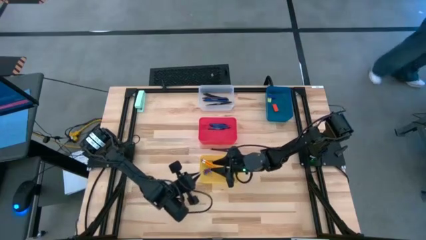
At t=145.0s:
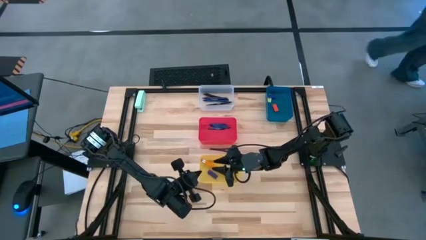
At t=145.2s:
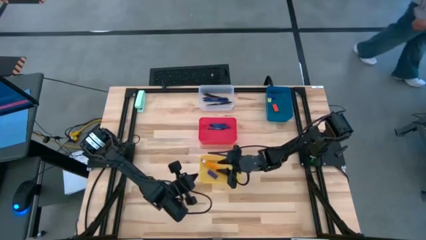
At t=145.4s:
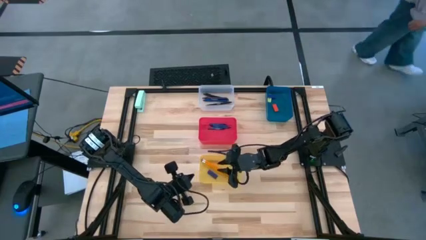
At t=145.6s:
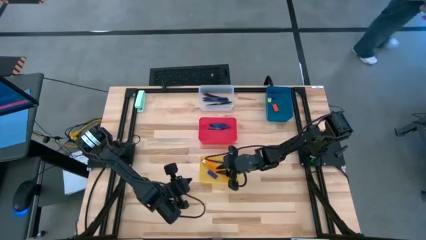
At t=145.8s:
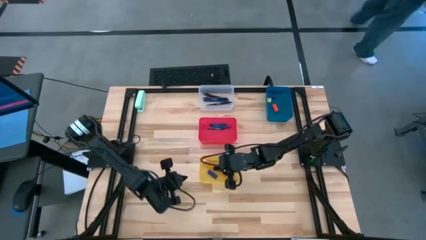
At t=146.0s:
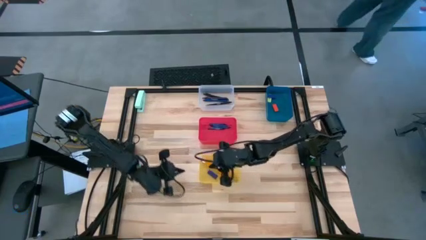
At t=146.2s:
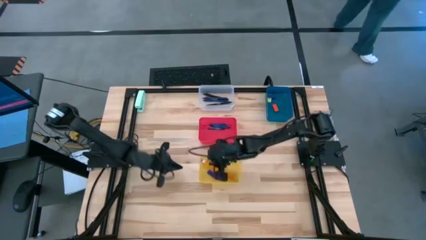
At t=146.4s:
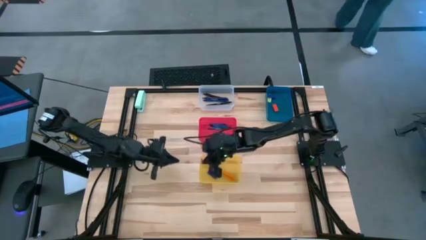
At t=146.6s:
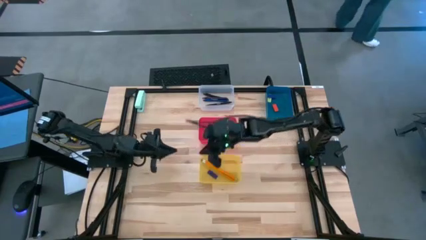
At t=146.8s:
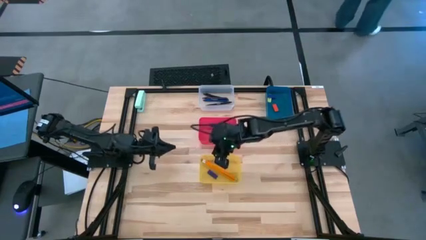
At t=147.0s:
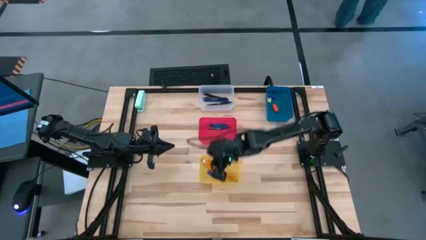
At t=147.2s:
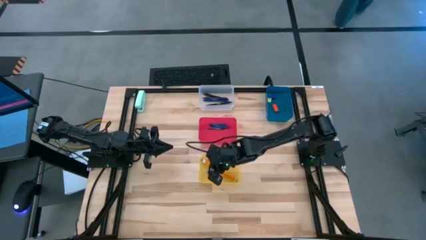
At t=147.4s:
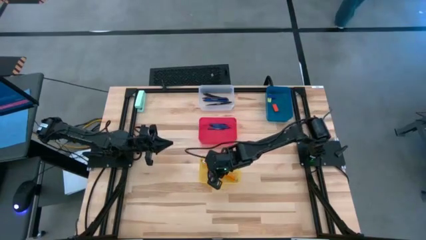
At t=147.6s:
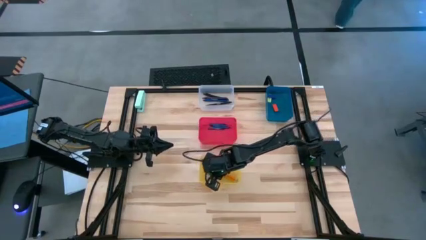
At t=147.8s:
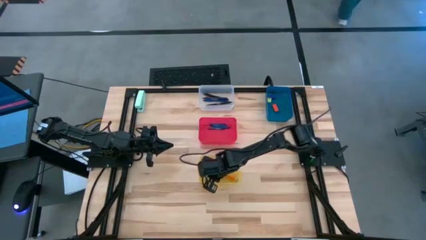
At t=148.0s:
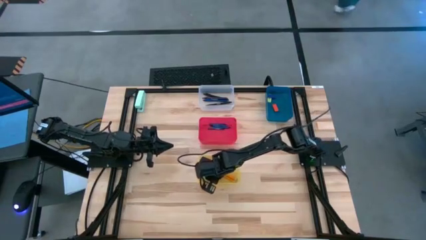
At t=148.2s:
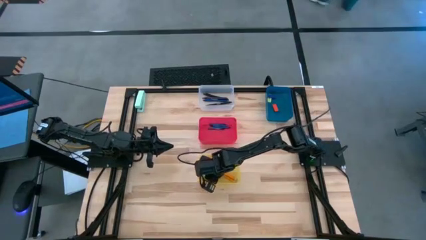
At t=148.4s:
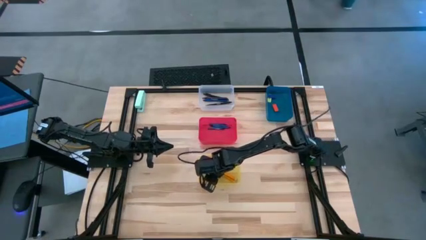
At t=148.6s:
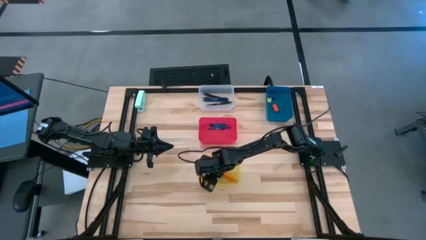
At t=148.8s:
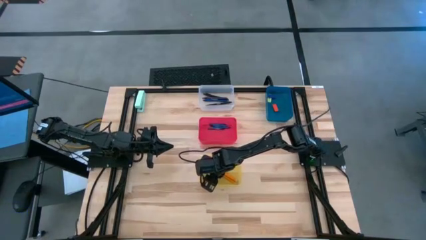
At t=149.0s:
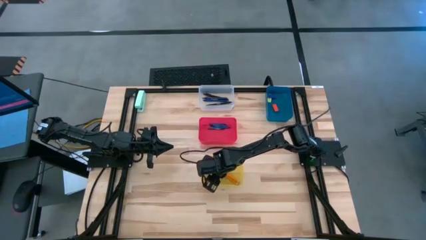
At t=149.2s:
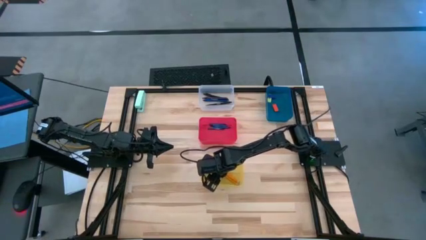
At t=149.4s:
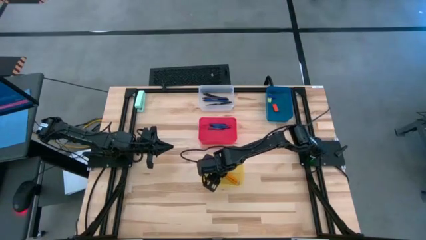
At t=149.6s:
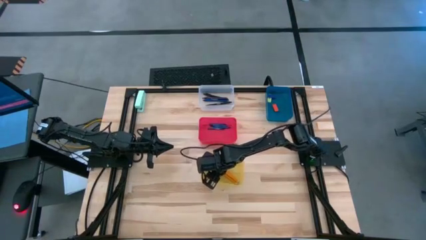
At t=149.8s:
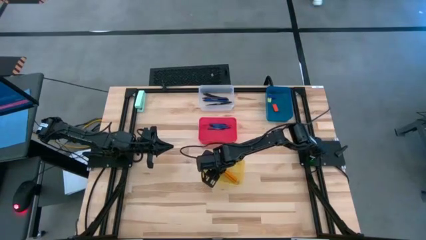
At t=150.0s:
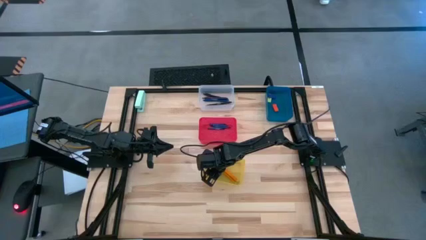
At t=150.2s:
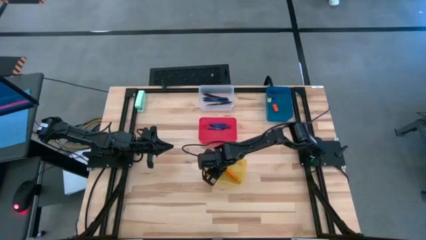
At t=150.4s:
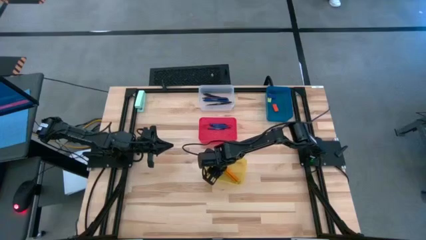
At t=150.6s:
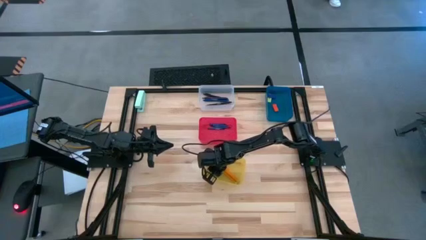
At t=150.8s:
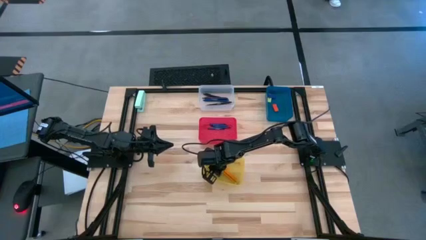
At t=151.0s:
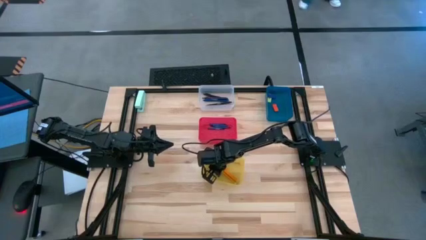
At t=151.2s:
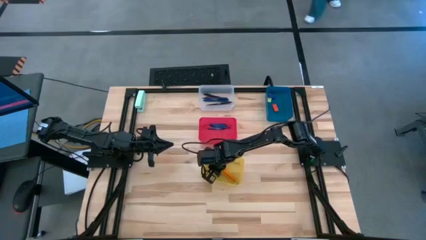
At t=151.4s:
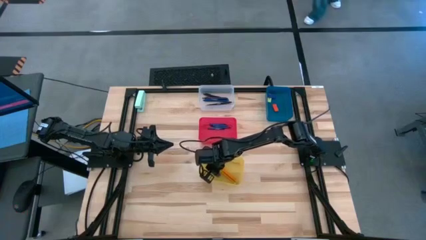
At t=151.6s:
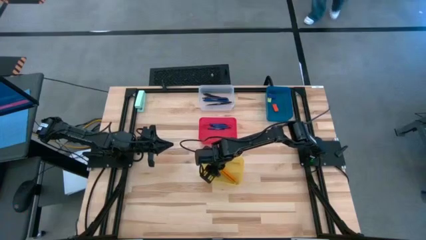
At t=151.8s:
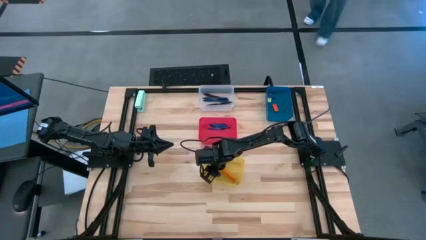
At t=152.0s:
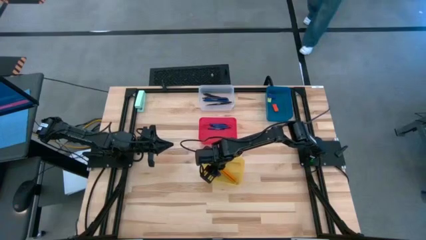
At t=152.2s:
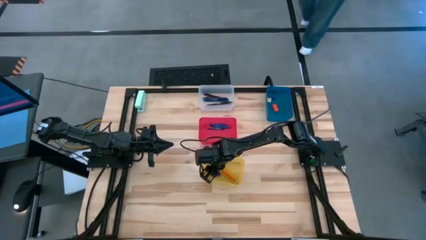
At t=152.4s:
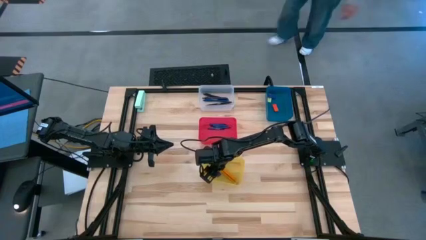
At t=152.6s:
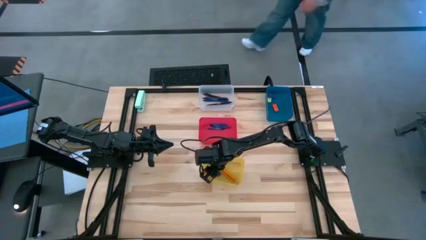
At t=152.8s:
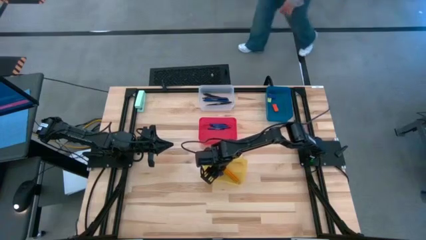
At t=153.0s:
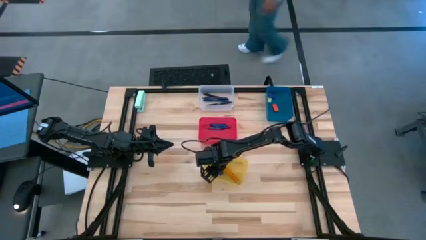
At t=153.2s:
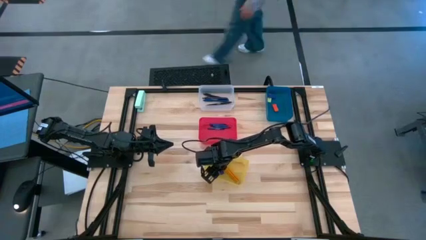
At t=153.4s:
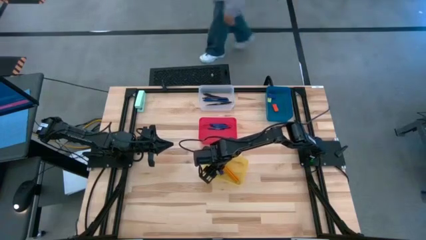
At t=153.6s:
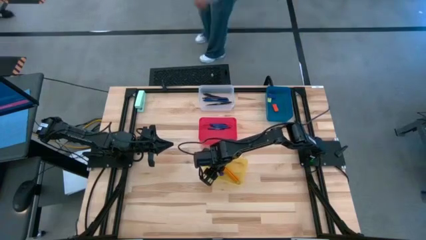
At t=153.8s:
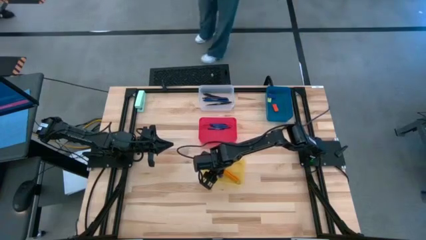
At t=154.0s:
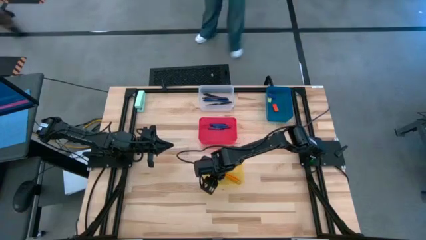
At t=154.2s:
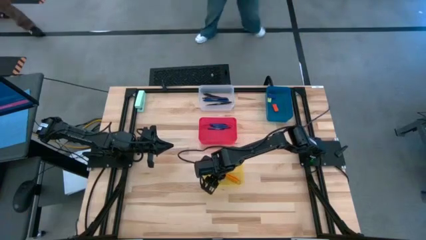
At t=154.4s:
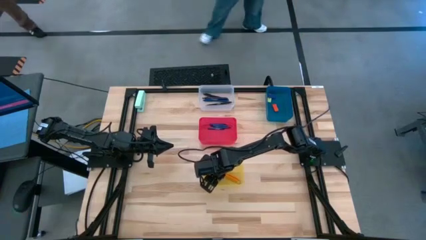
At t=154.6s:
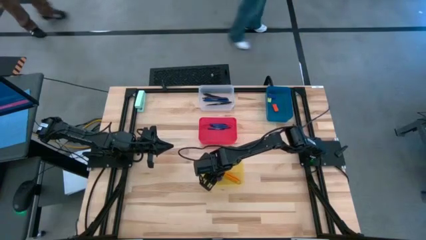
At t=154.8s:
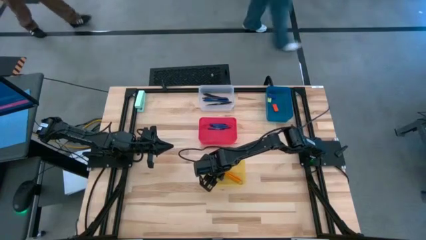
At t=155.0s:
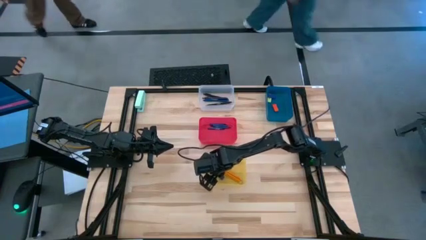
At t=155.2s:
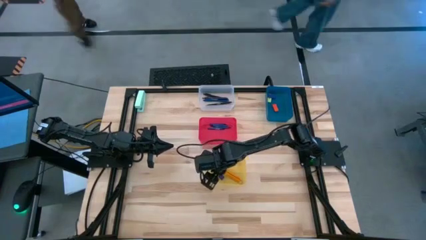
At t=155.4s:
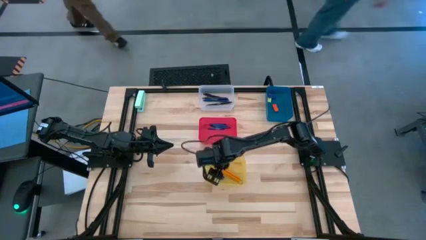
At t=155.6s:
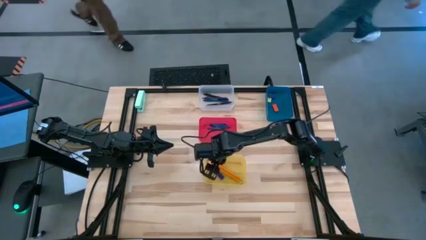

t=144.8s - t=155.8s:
Task: Sort crayons/erasers/pens/pencils in bins
Adjust the orange pencils in the yellow bin

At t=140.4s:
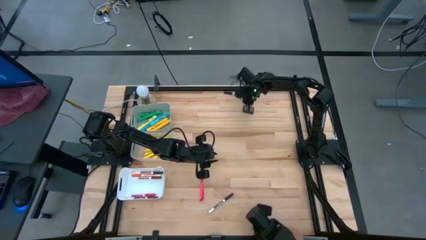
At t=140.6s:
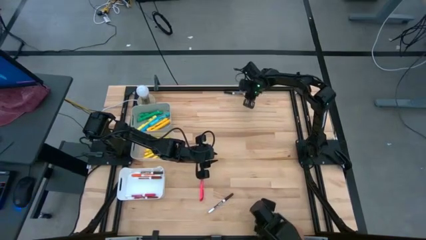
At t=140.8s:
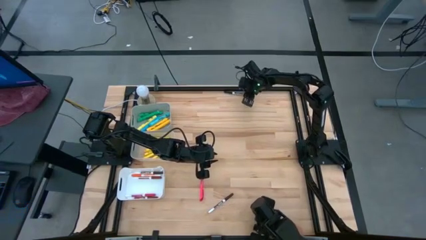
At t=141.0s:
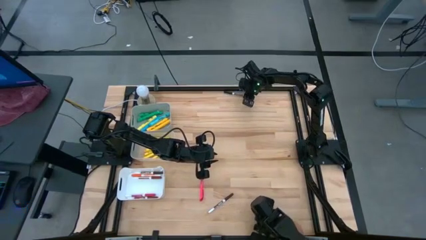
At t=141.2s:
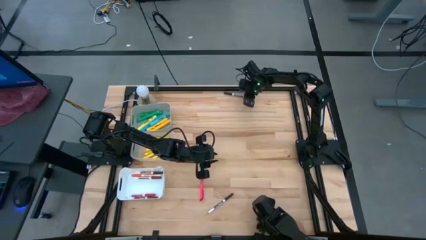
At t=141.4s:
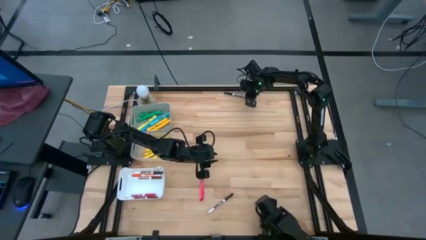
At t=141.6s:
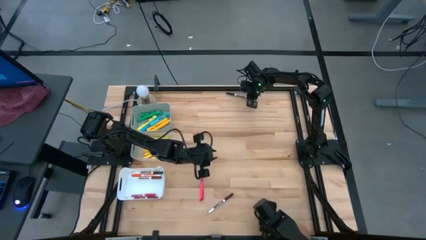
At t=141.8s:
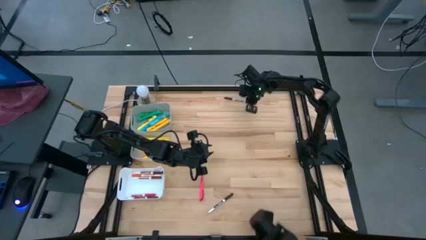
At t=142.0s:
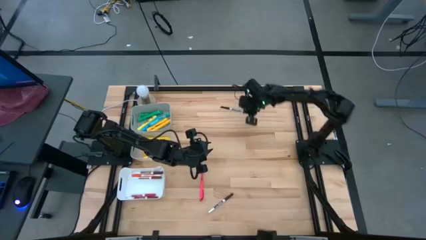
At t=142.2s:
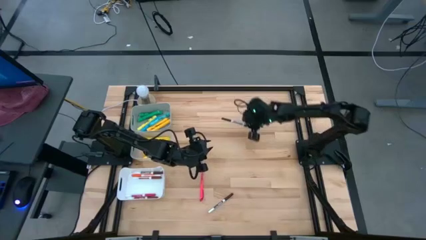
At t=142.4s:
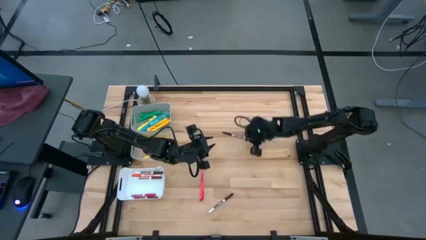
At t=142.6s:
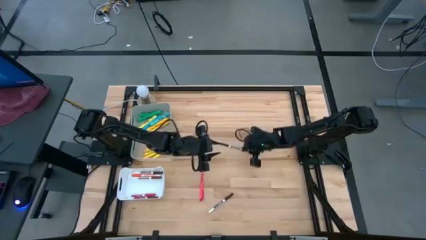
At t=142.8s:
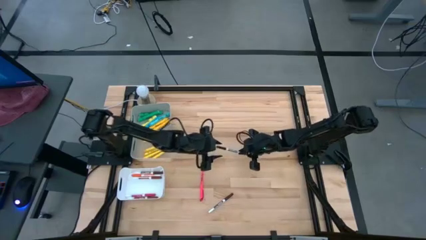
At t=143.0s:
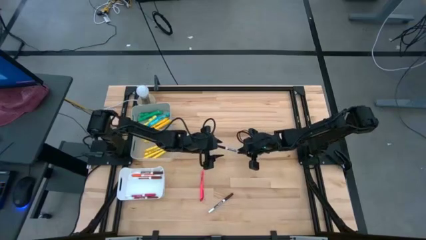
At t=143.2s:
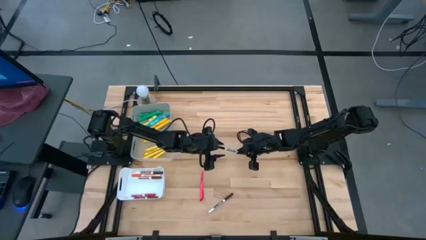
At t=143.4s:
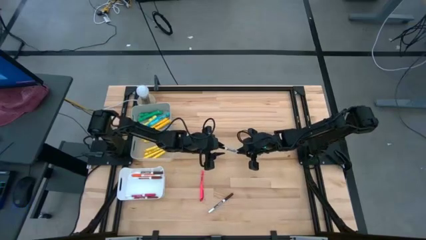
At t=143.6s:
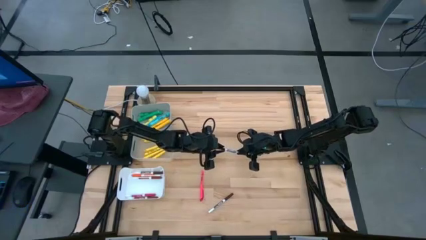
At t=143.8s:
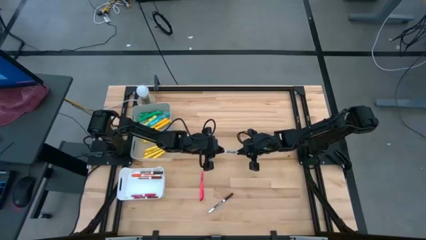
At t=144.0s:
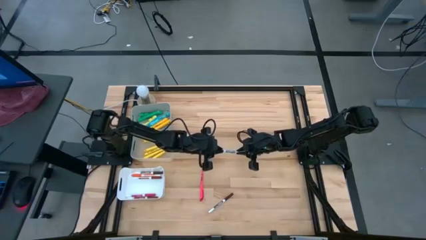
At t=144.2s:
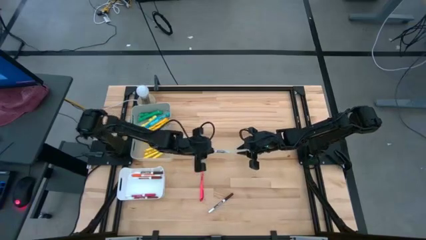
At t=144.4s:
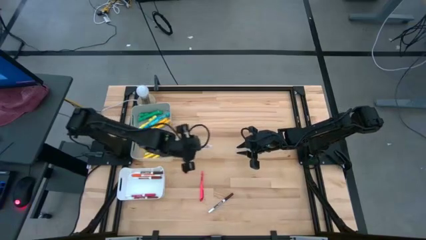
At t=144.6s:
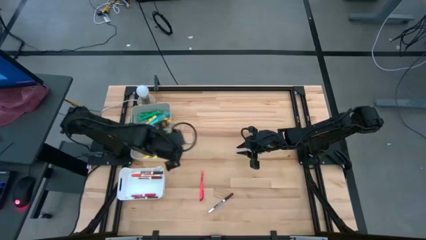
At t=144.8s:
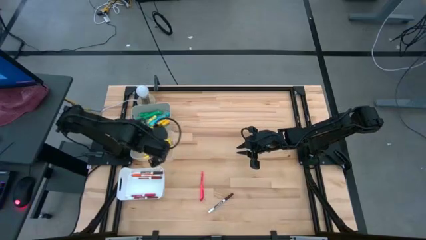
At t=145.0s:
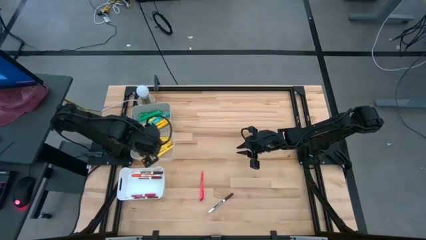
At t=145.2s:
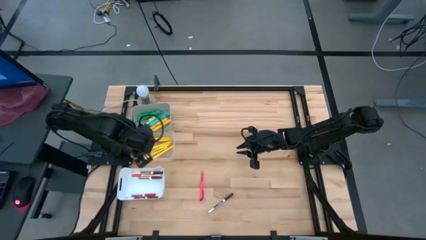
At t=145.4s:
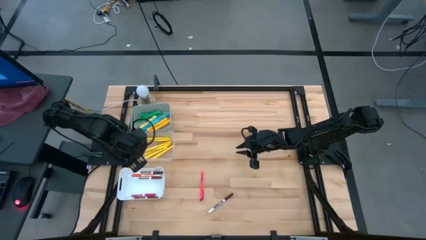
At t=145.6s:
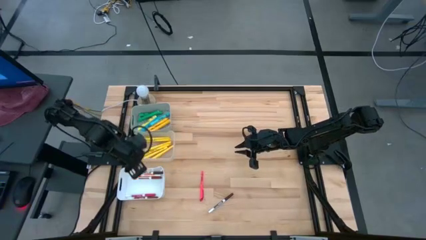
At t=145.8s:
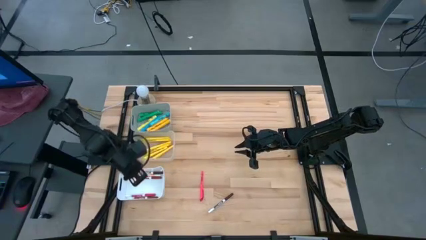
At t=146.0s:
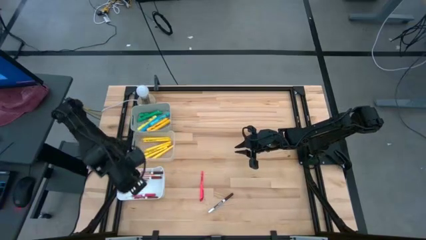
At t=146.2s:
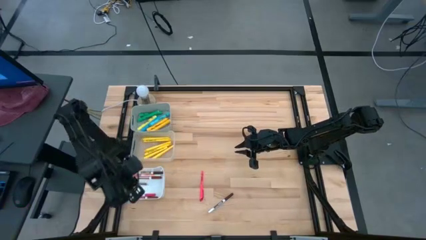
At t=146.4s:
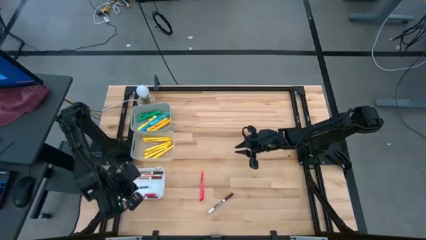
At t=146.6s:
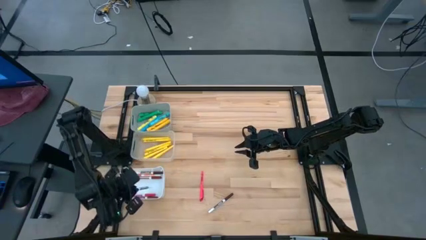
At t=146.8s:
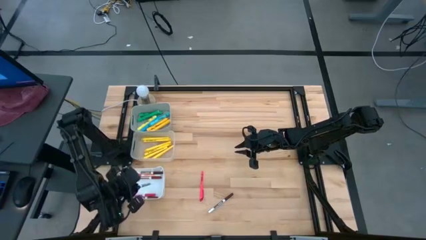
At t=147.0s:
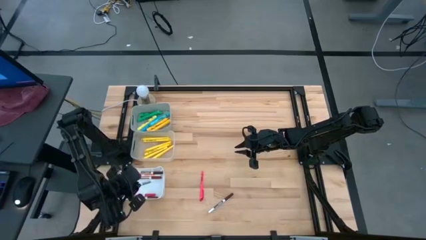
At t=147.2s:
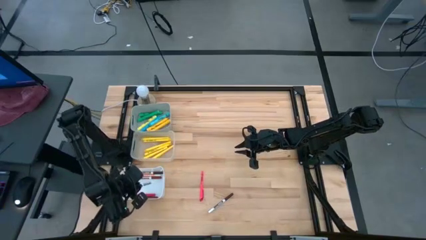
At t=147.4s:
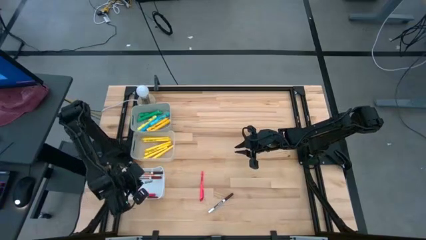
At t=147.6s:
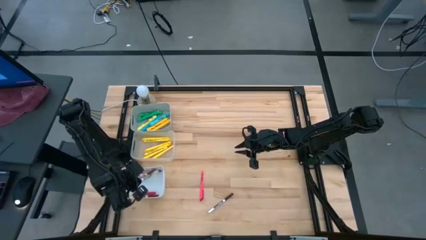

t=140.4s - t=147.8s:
Task: Pick & Place Markers
Put the black marker into the white bin
